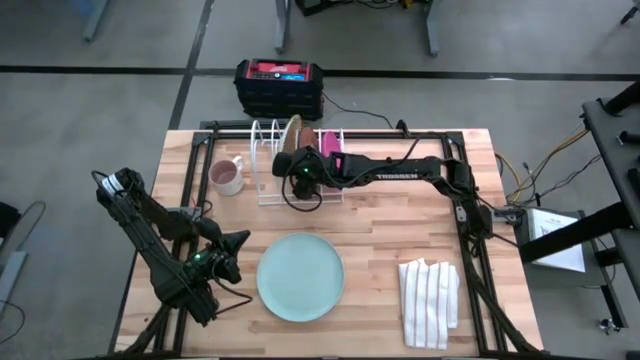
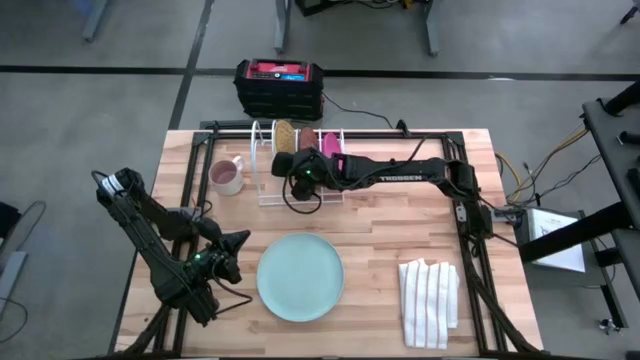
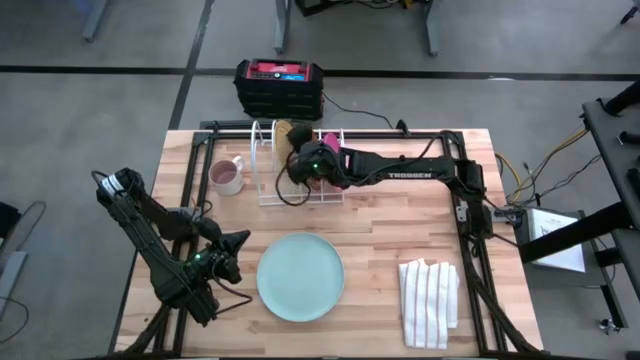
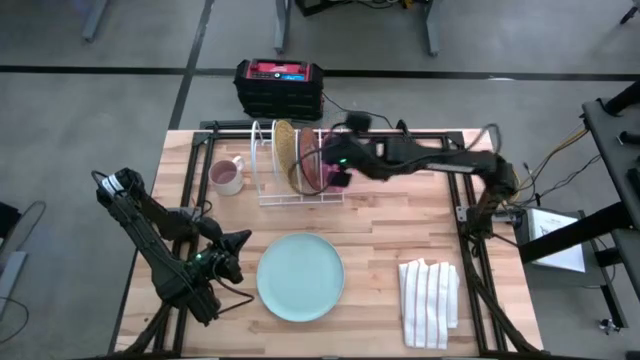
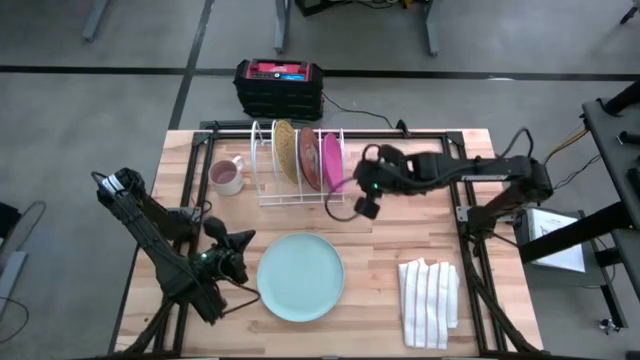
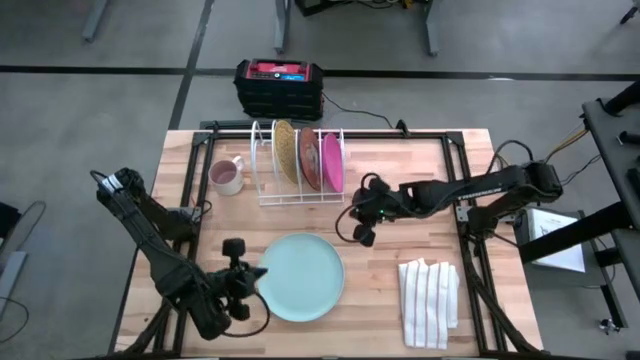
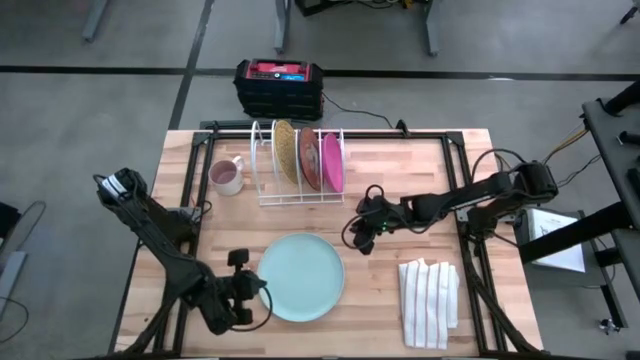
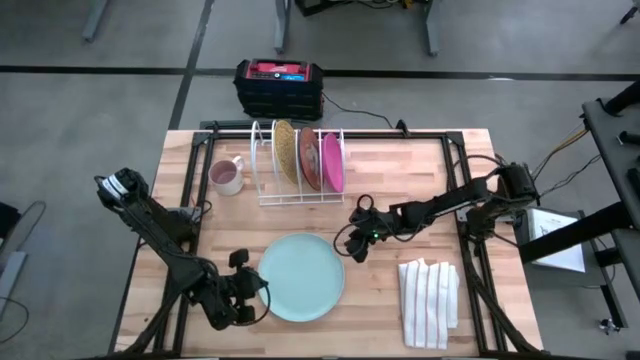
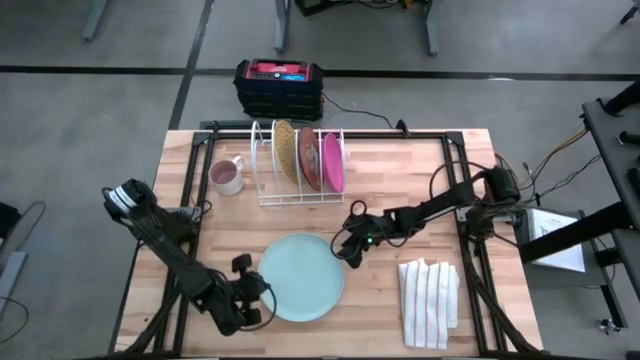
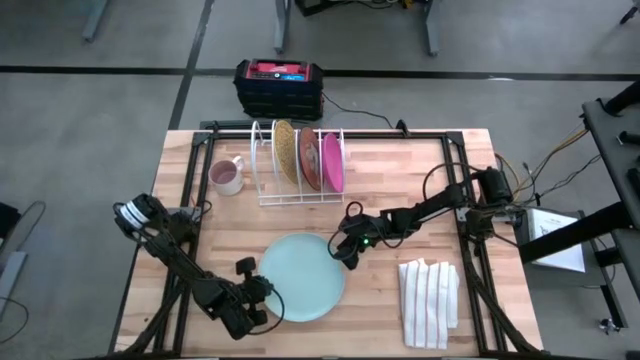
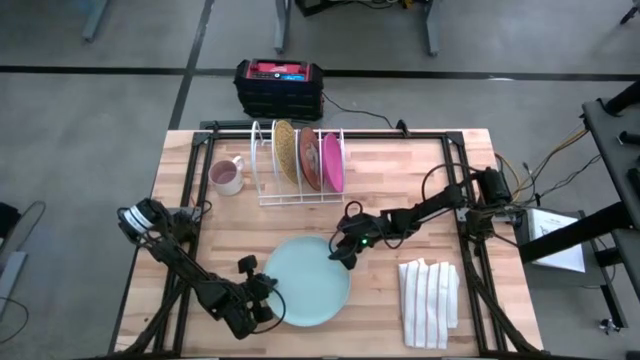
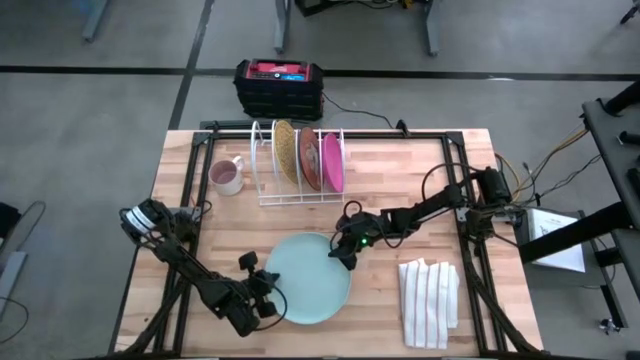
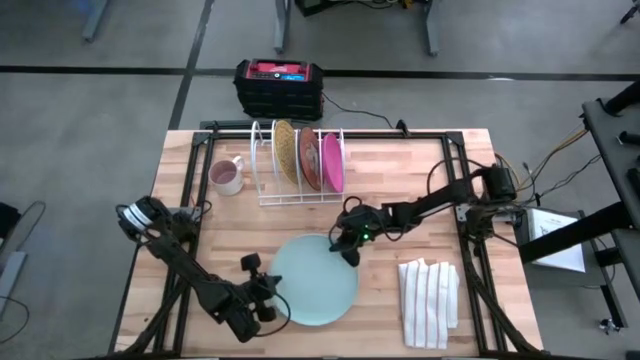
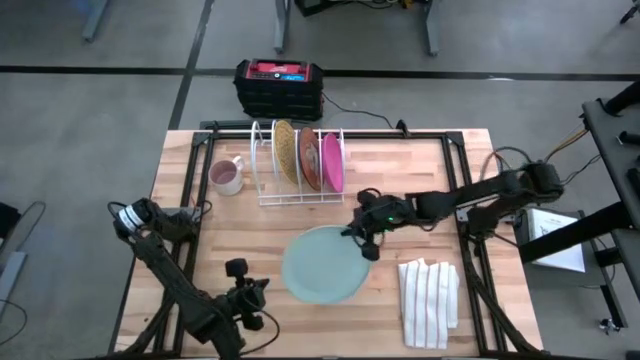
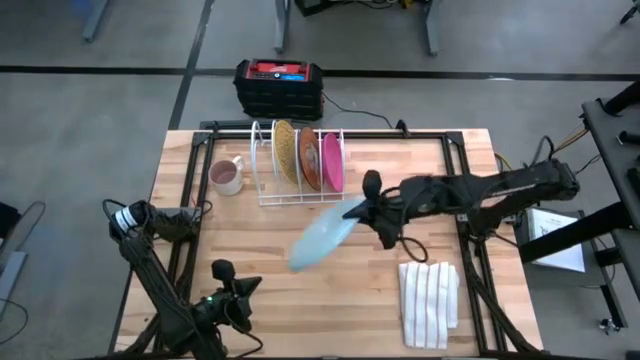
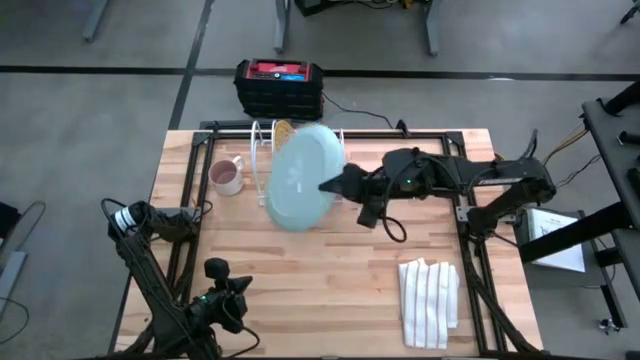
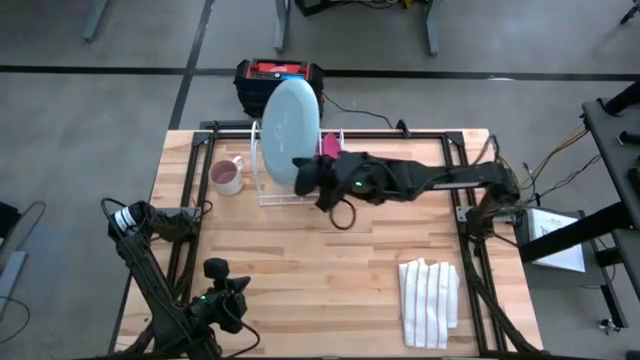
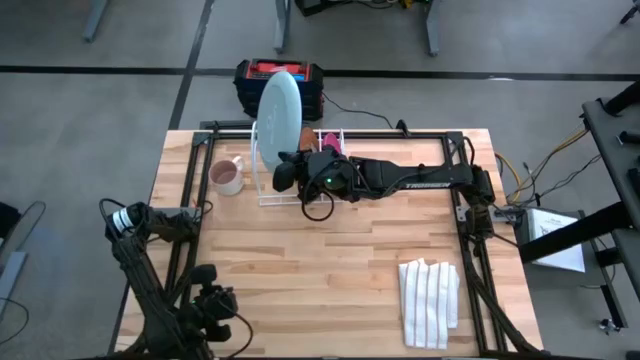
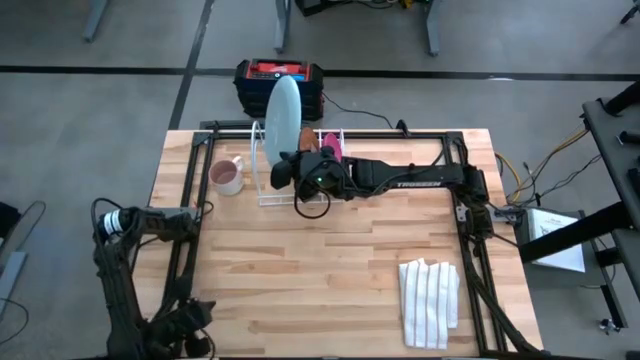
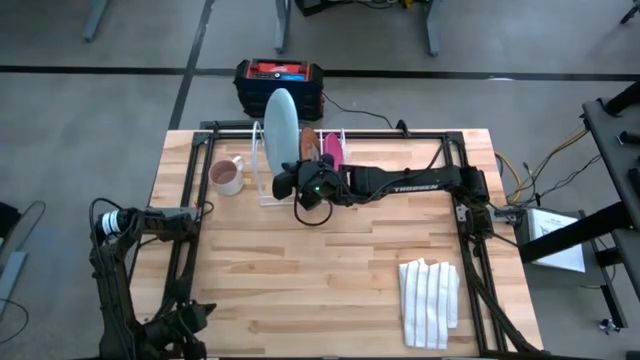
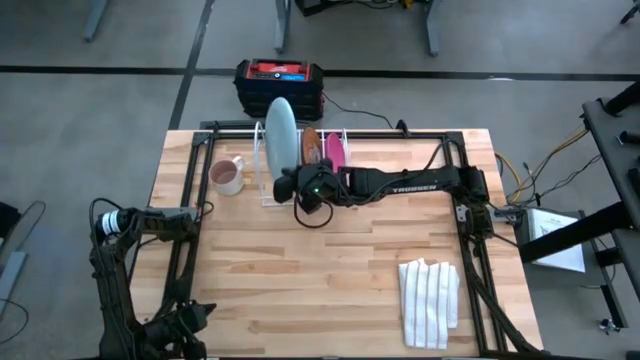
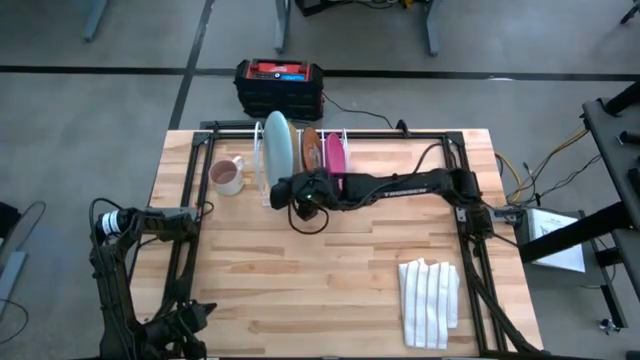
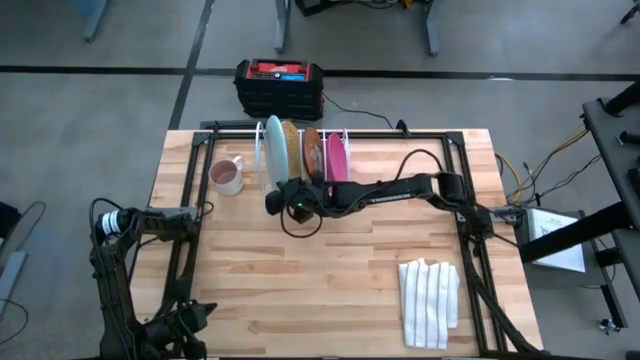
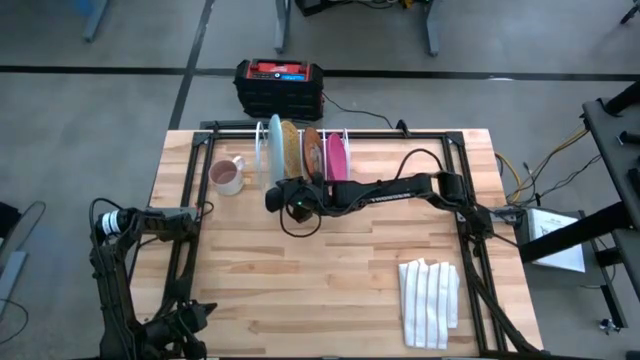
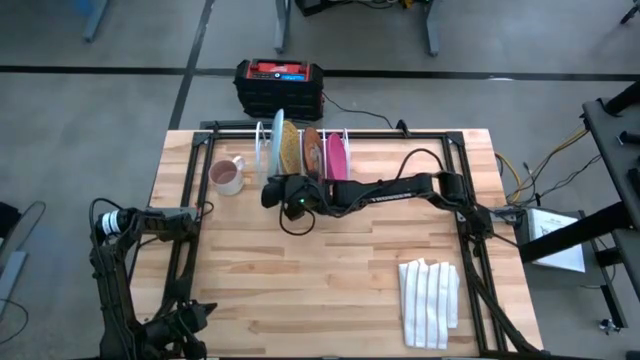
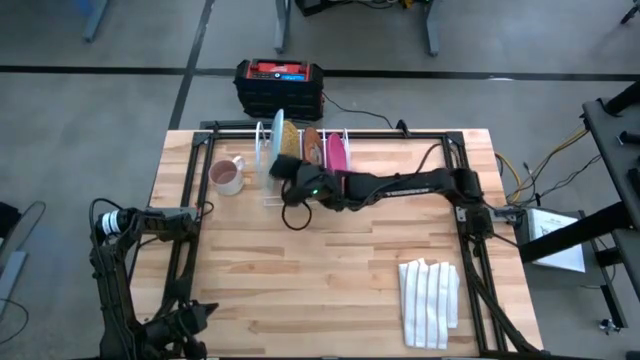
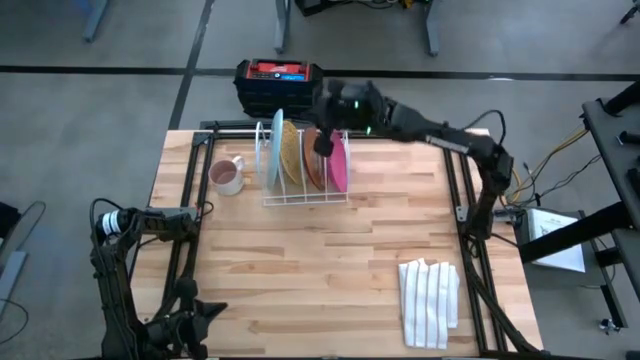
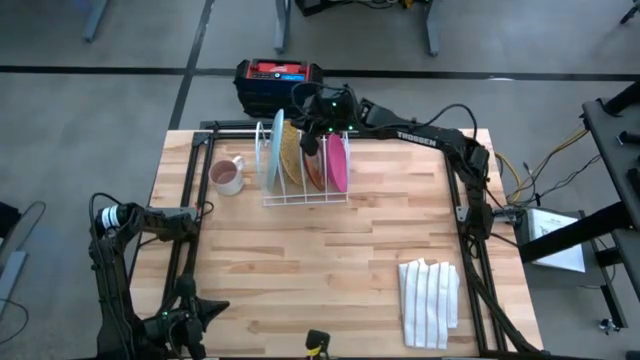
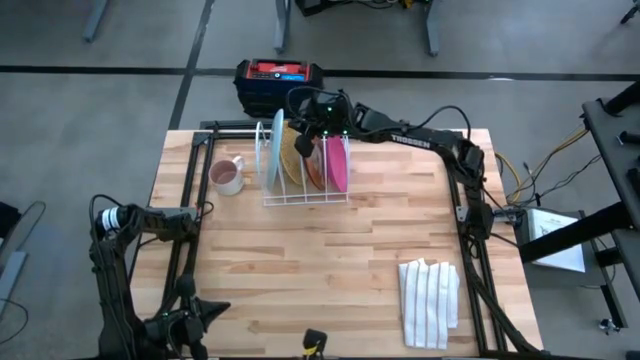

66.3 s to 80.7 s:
Task: Sort dishes
Put the blue plate into the dish rack

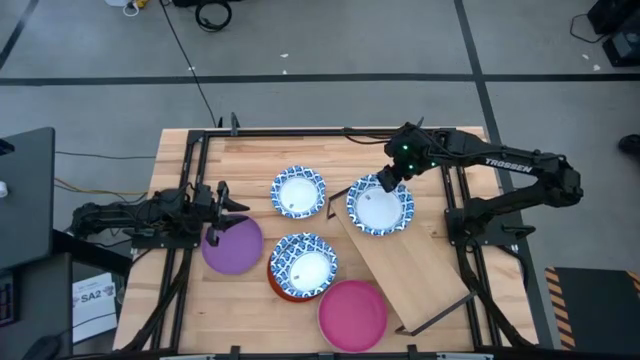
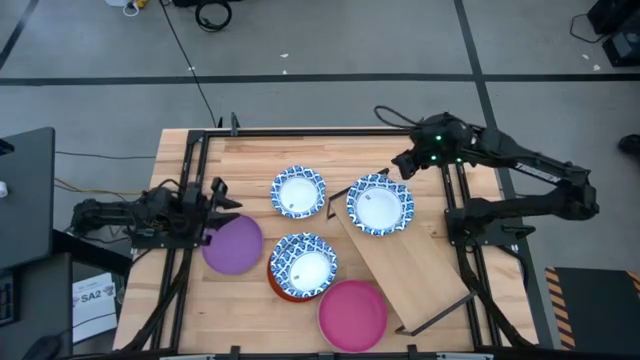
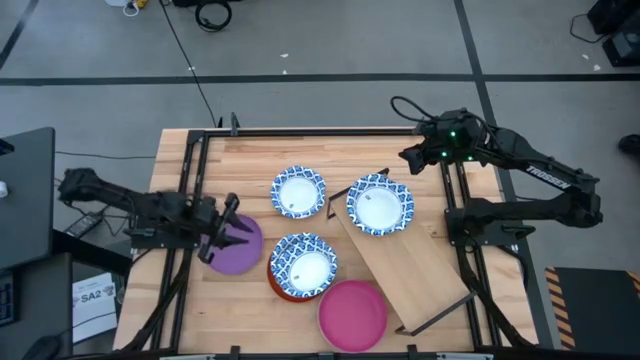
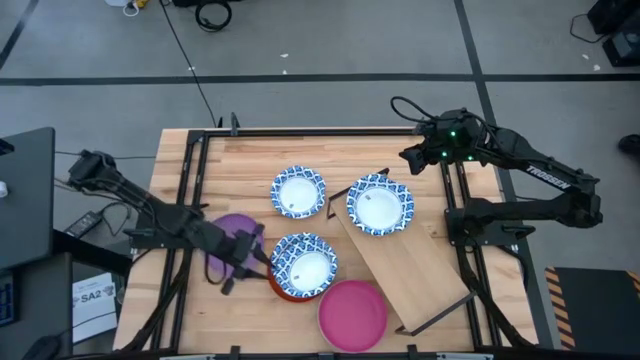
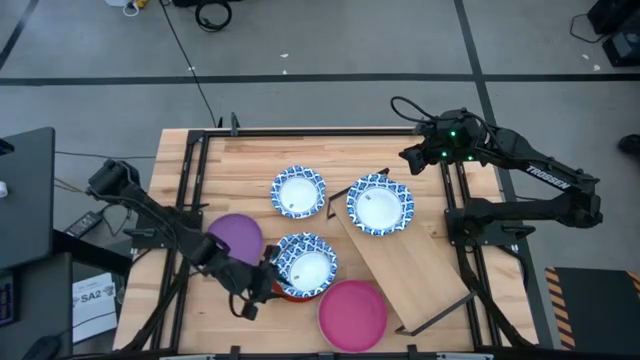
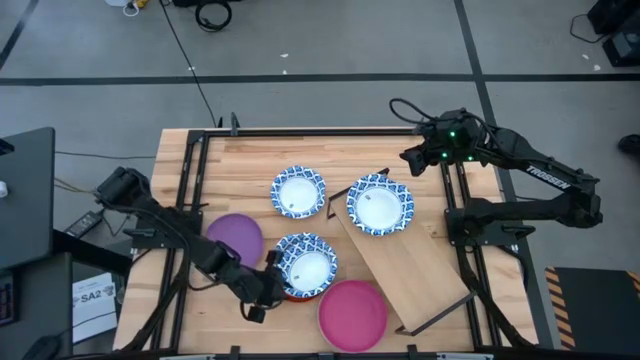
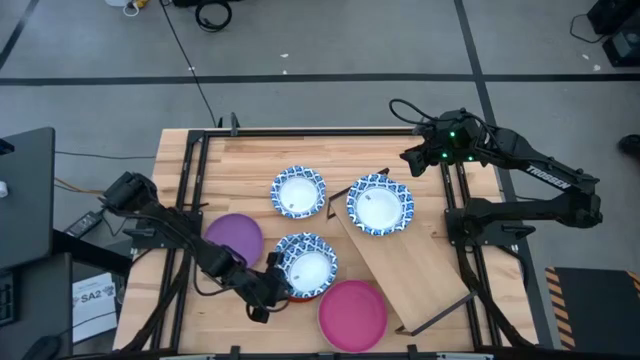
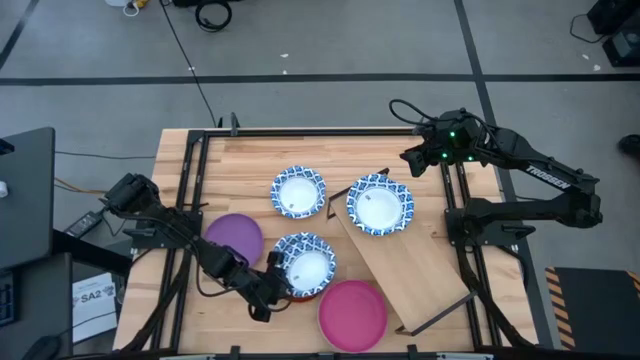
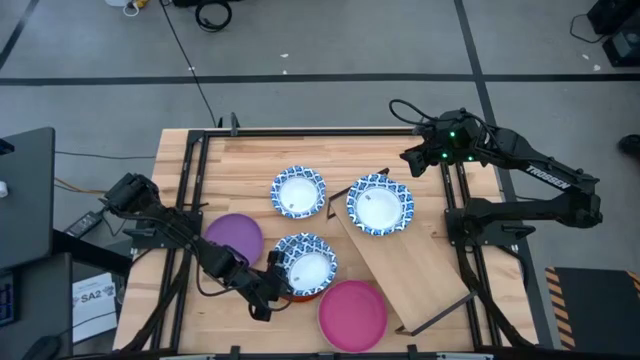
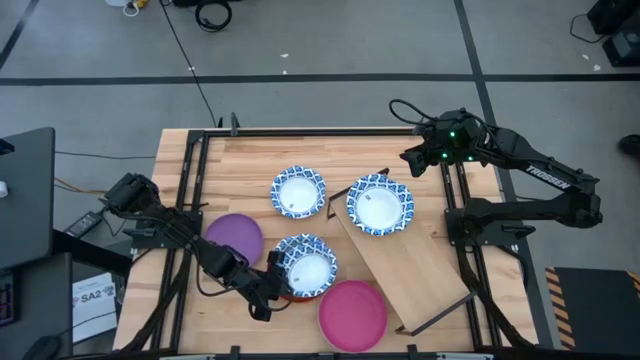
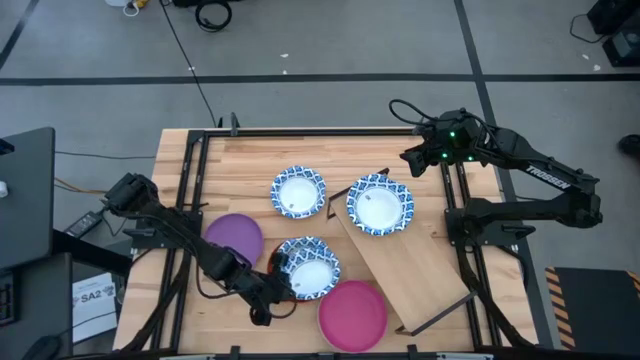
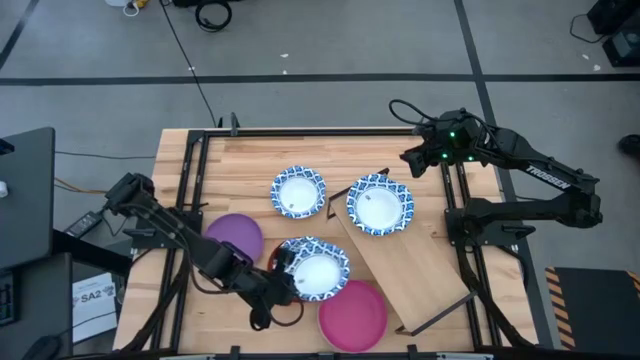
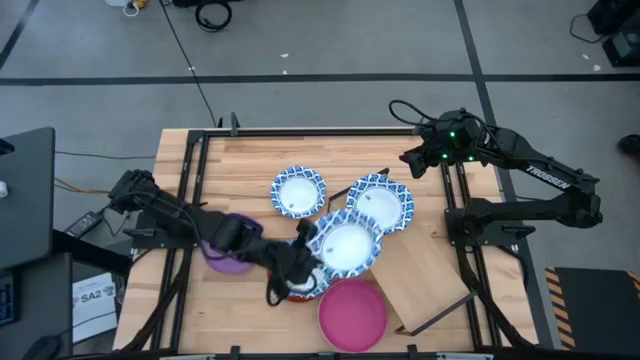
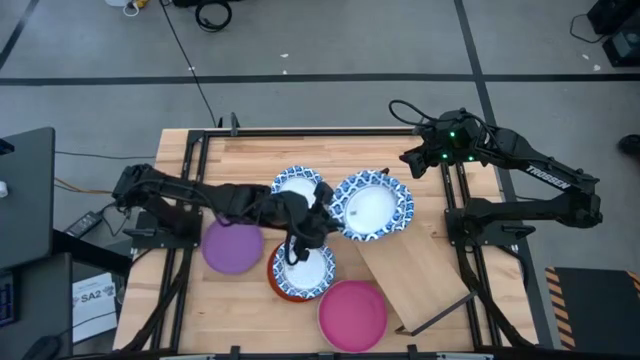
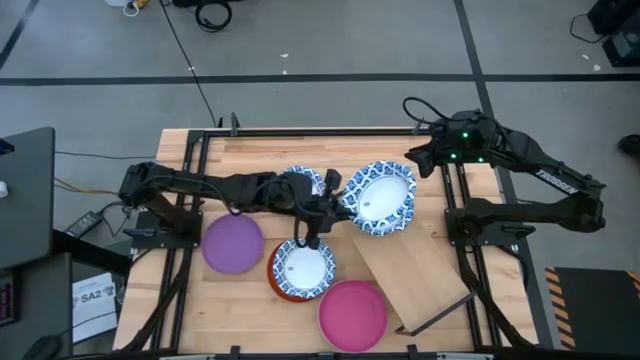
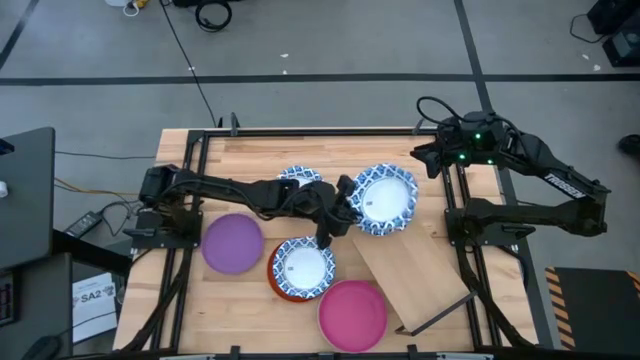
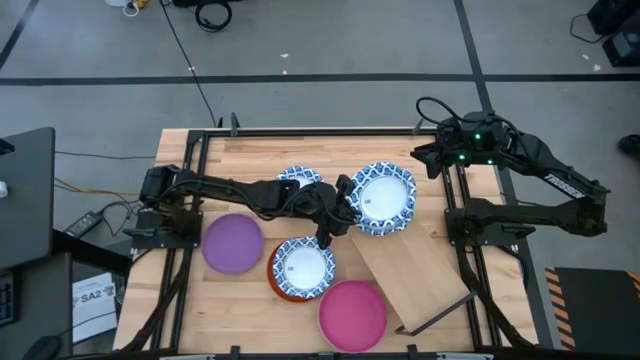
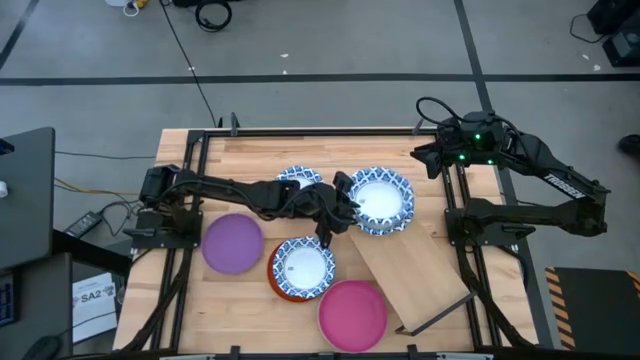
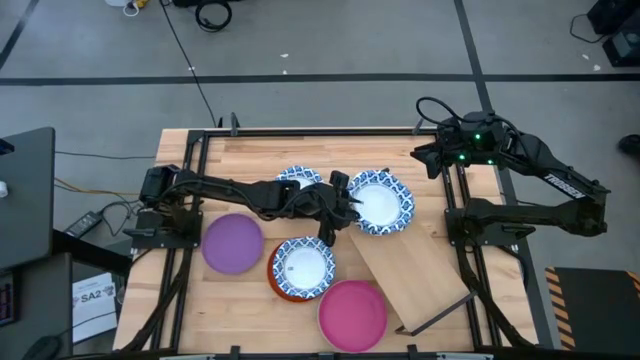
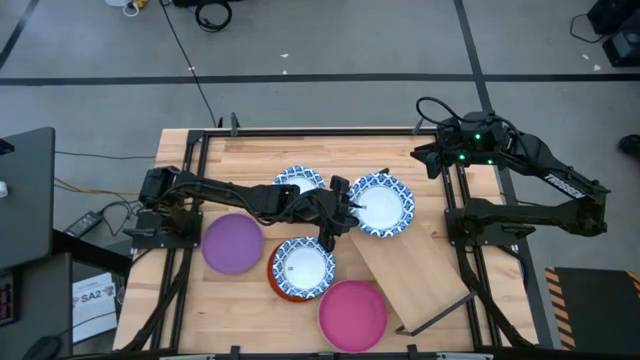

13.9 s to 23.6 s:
Task: Place and stack plates onto a shelf
Stack the white bowl on top of the white bowl on the shelf
